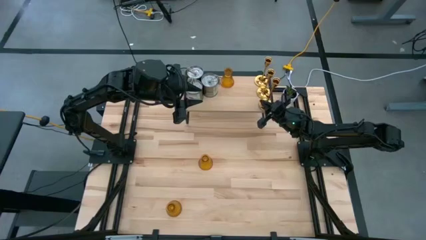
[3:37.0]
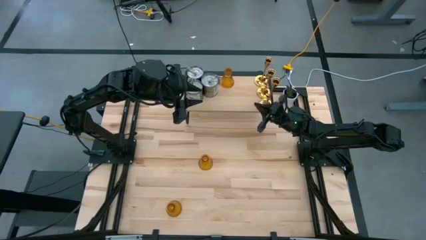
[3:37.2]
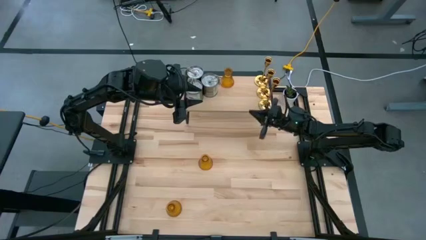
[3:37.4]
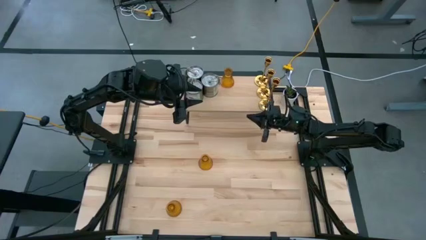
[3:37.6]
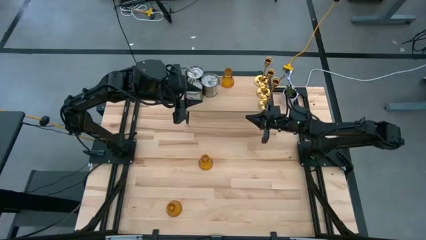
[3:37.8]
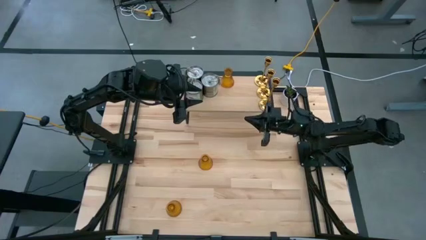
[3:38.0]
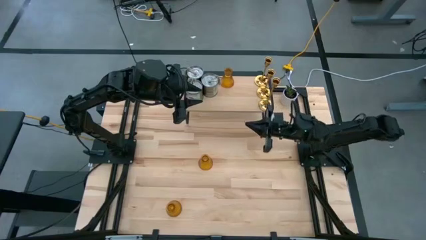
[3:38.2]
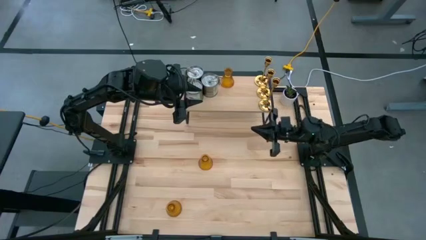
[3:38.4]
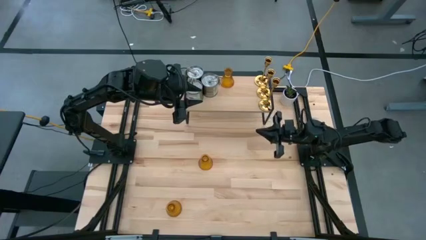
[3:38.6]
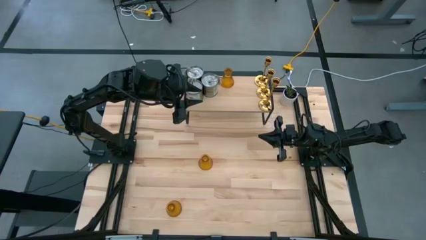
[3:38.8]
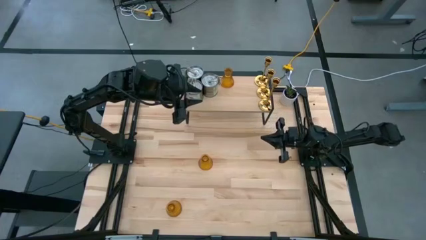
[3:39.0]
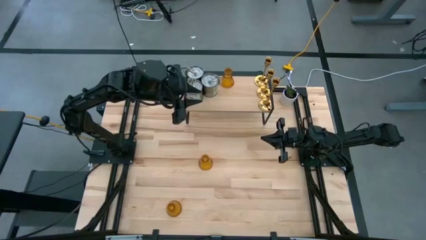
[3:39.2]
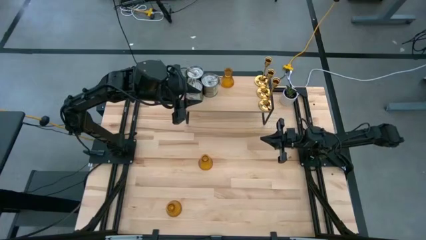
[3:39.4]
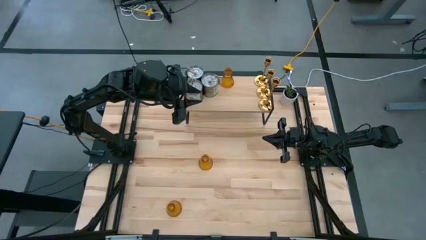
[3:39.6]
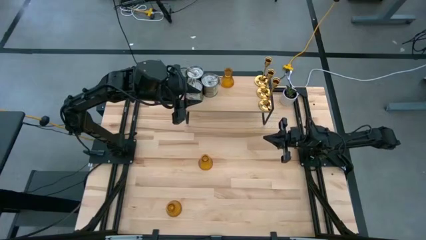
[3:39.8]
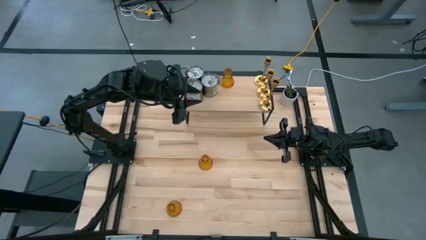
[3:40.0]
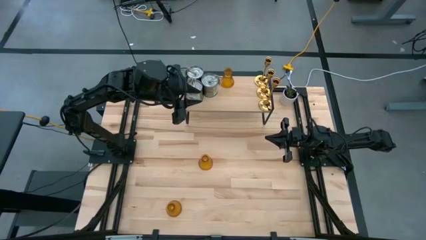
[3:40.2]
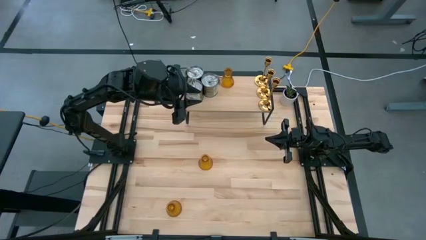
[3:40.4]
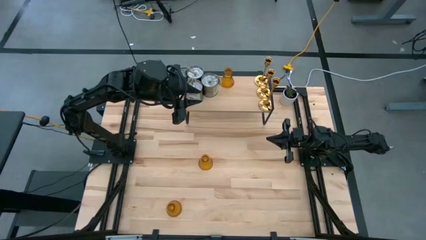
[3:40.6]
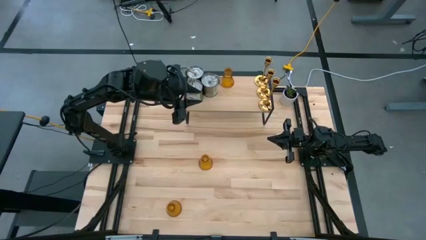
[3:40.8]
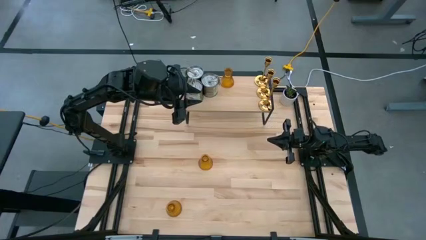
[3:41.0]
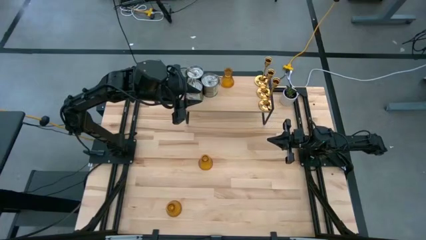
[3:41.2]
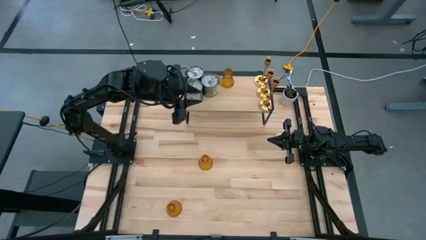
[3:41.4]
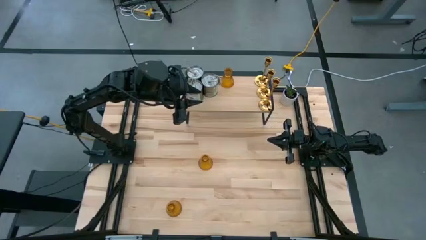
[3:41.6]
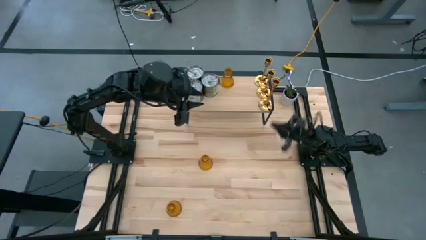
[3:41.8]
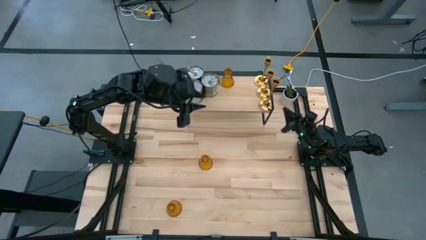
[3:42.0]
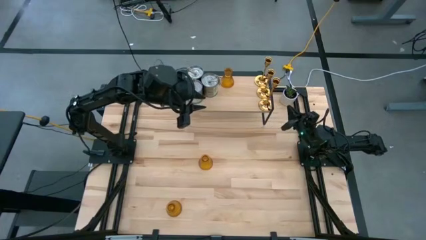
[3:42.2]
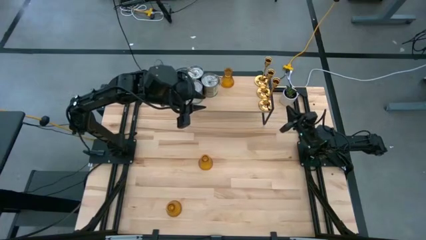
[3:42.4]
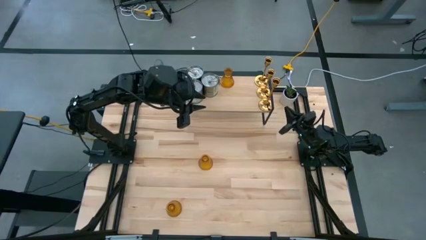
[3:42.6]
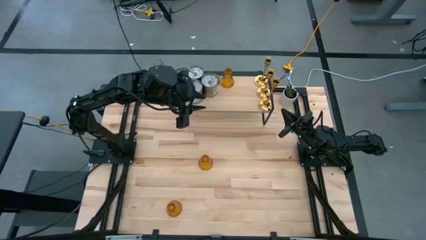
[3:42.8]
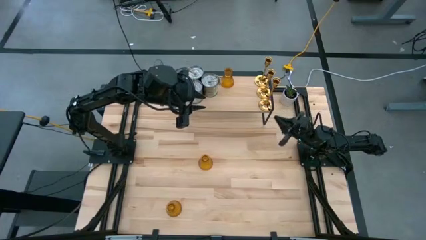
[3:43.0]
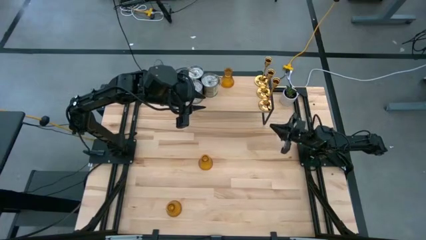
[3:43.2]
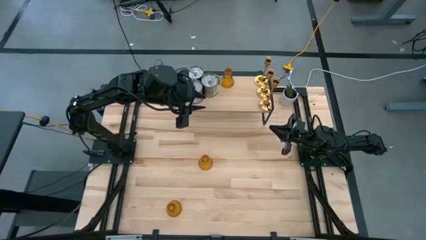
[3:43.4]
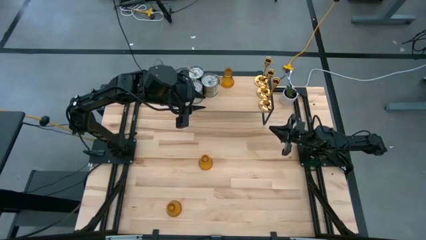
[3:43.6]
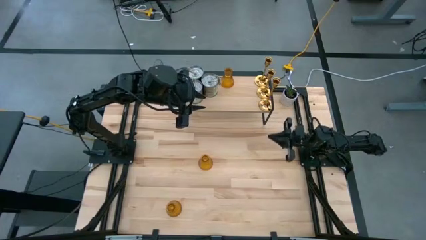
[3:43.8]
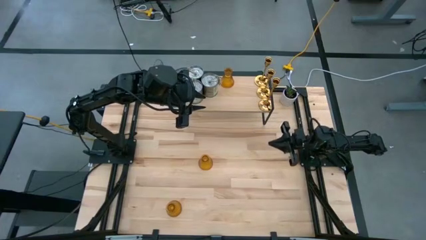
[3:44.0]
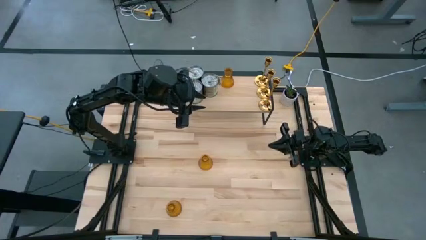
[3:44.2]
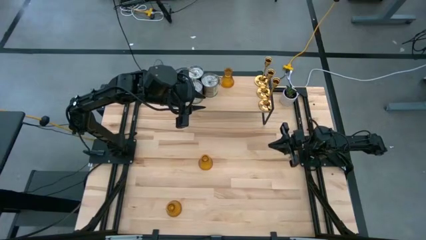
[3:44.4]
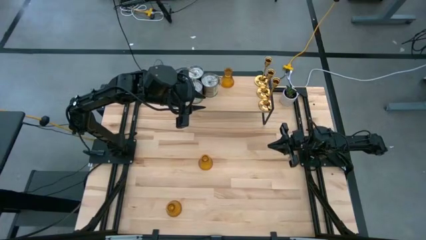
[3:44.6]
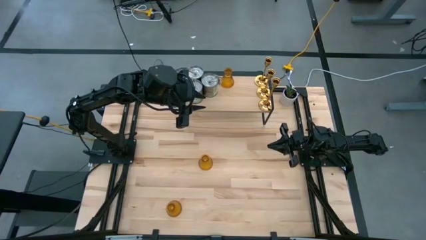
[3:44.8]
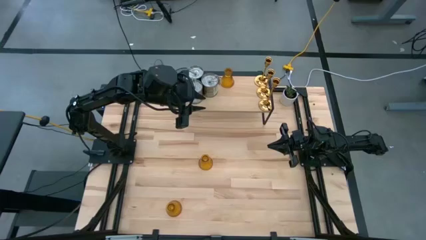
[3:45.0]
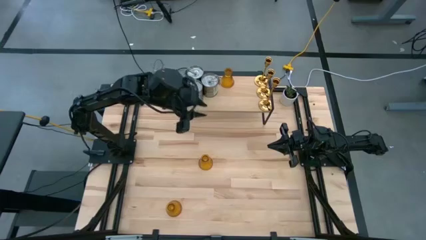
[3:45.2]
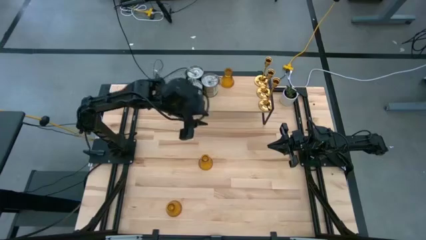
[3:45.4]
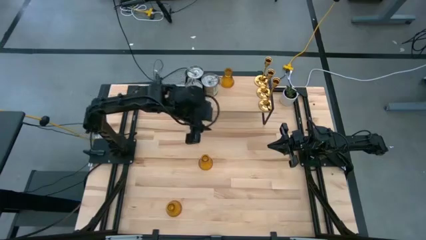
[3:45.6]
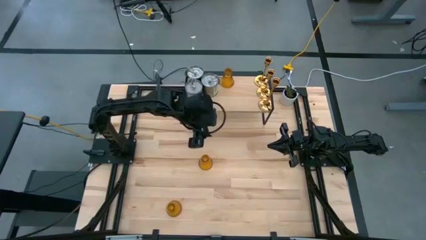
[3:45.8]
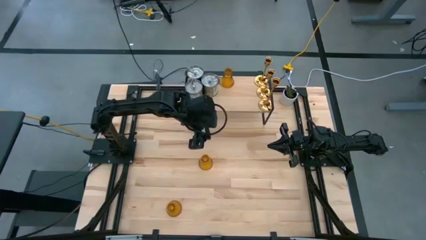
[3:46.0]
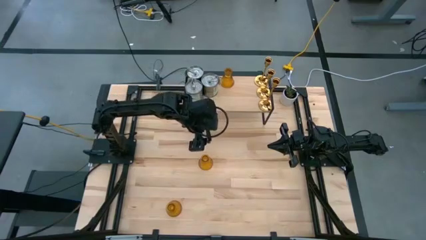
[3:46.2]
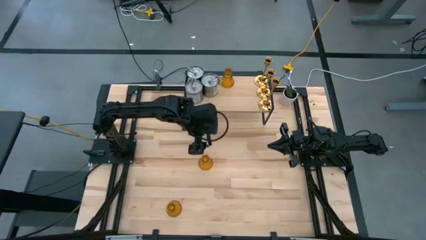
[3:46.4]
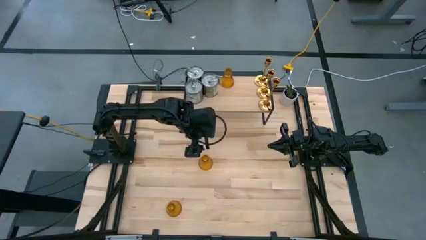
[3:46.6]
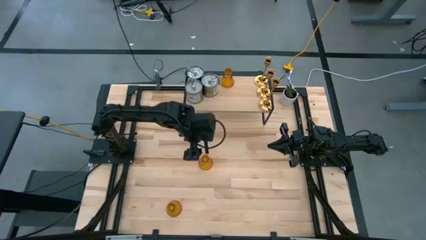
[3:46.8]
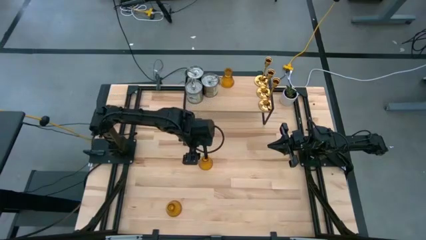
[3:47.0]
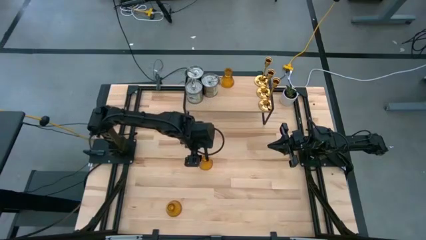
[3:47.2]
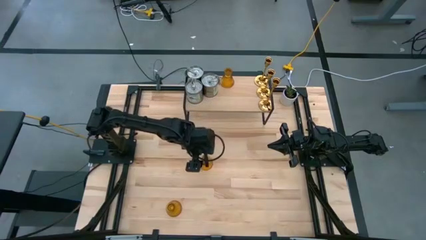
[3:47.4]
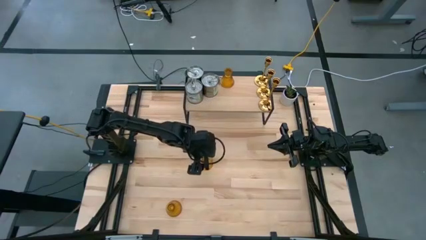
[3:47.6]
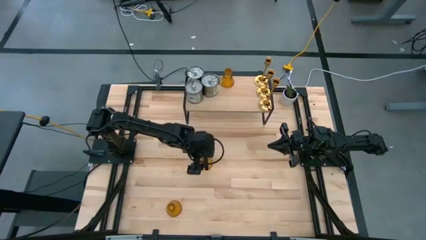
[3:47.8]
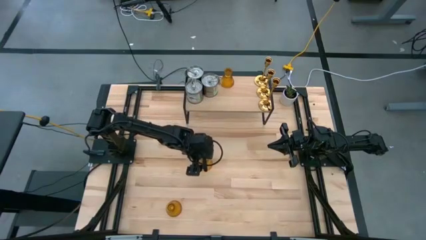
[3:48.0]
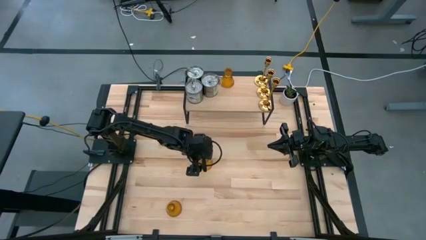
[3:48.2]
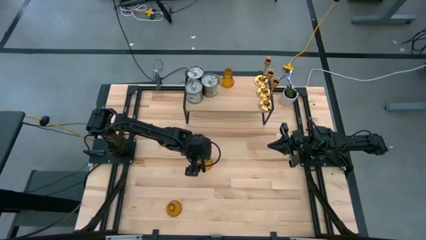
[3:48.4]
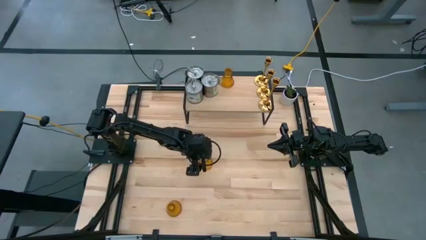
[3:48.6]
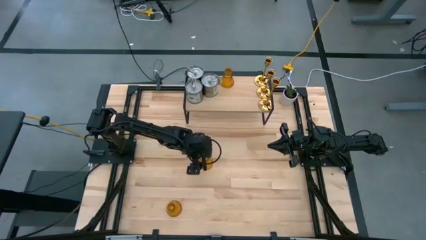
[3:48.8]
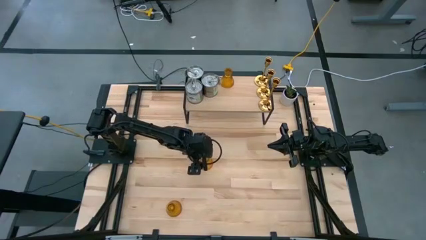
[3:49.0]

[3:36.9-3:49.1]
Task: Pick & Place candle stick holders
Put the top orange glass candle holder on the shelf aligned with the other orange glass candle holder

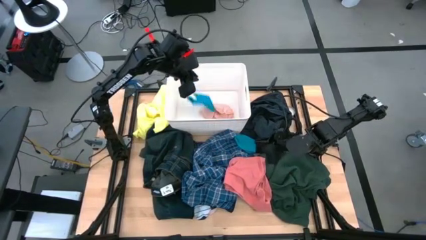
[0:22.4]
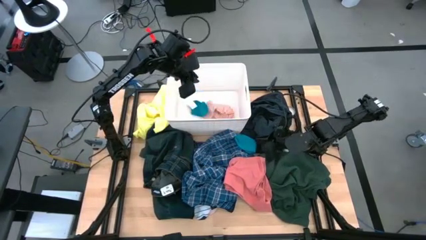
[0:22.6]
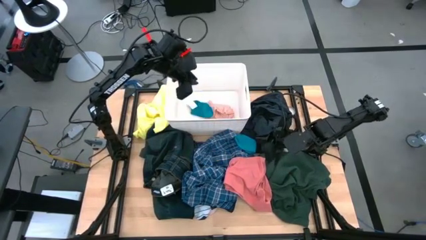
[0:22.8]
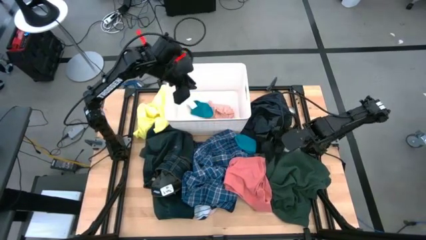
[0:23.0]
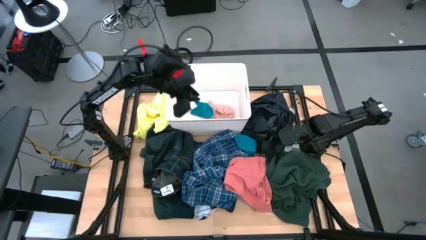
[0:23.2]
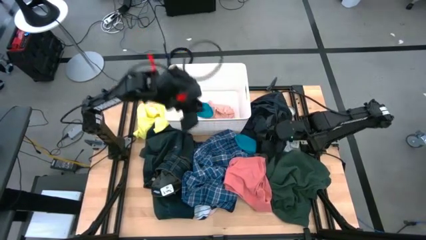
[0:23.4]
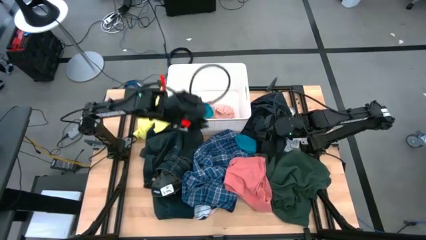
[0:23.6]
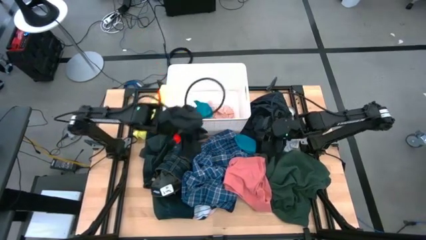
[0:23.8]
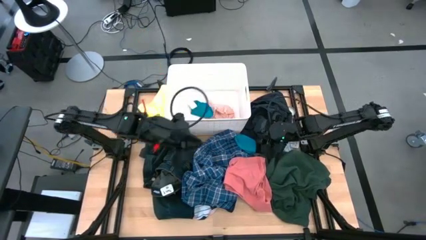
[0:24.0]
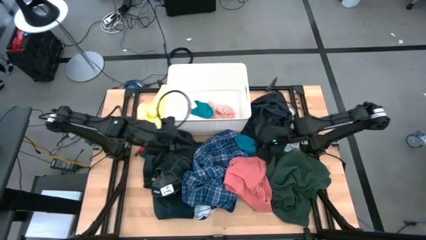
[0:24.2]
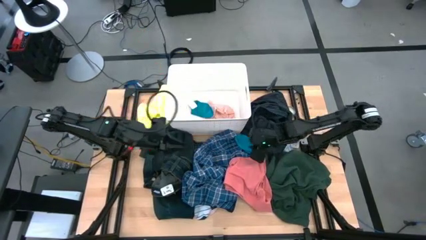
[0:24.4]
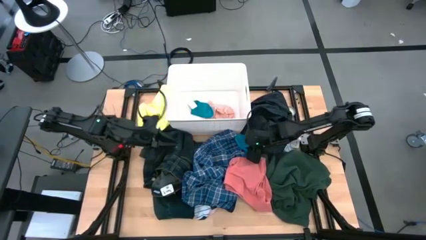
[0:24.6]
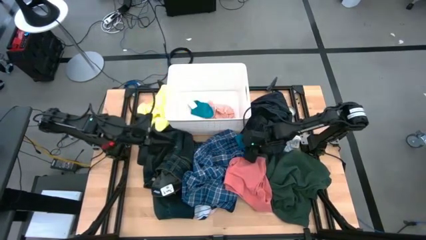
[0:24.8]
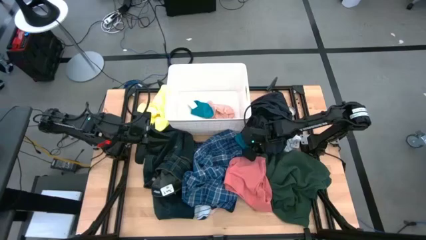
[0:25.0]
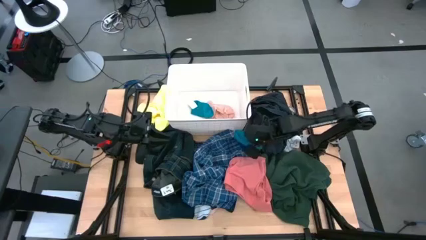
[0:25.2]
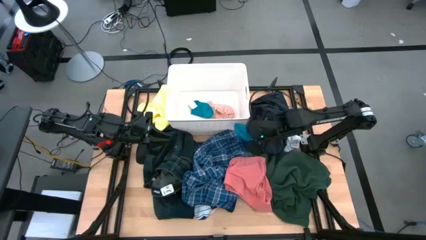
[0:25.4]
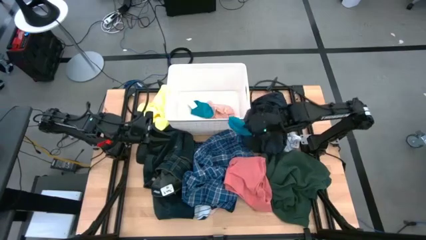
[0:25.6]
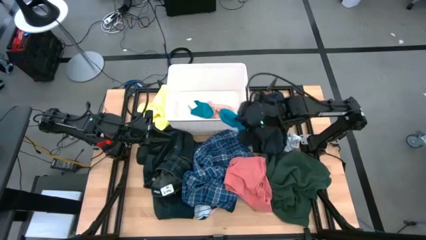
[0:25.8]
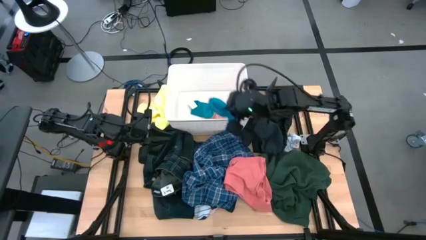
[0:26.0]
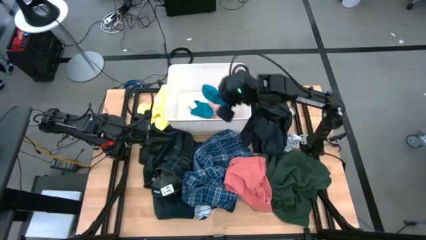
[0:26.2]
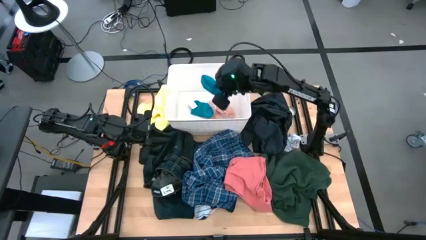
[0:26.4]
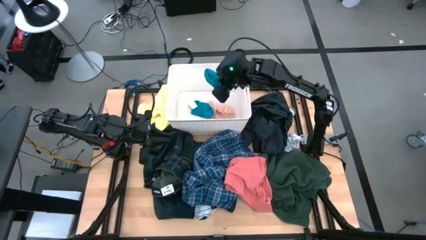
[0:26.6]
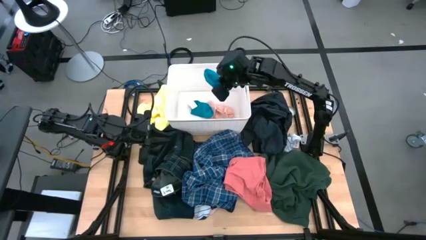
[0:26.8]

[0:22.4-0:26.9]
Task: Sort clothes
Put the blue sock into the laundry organizer
